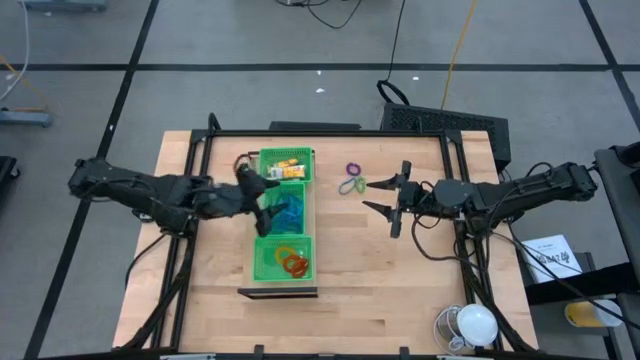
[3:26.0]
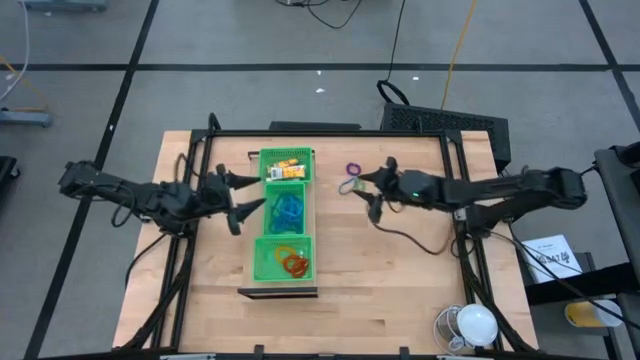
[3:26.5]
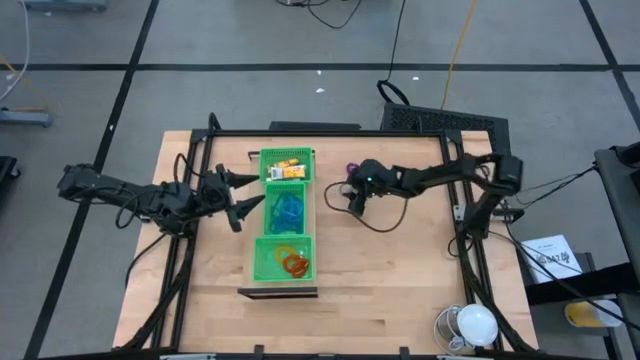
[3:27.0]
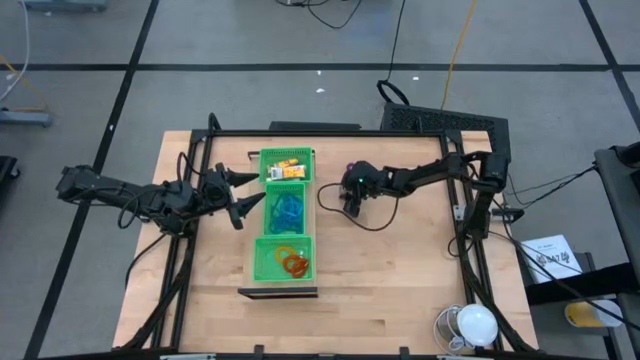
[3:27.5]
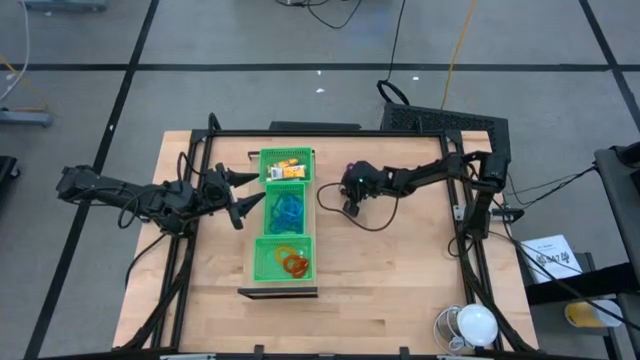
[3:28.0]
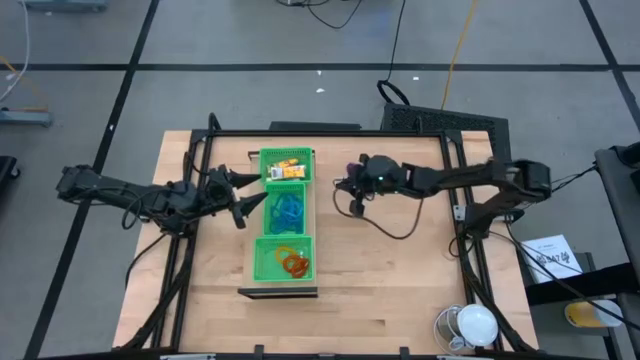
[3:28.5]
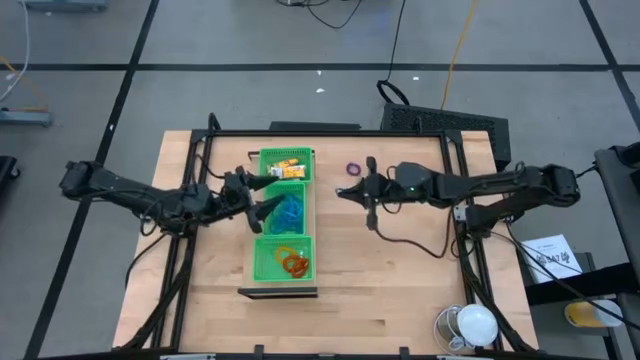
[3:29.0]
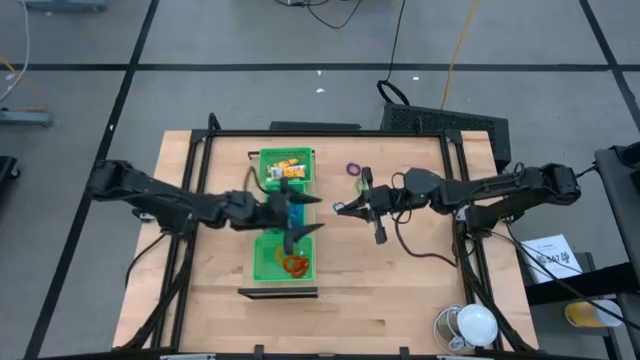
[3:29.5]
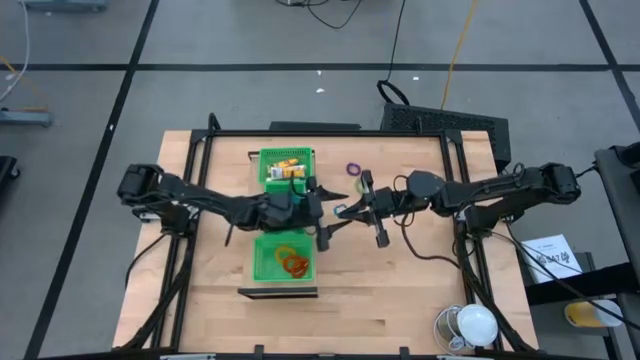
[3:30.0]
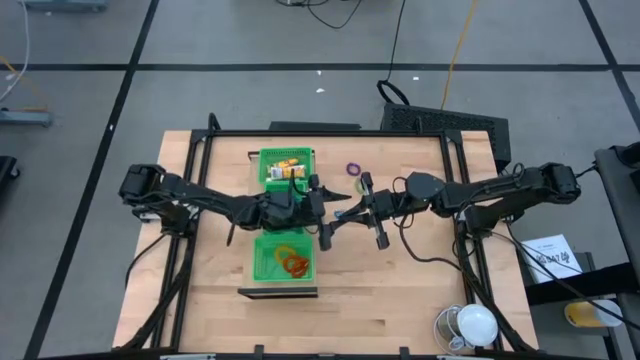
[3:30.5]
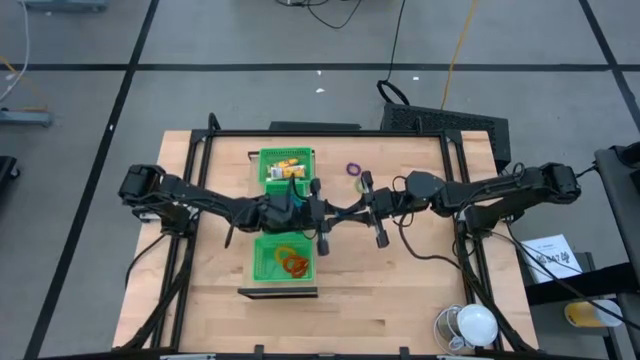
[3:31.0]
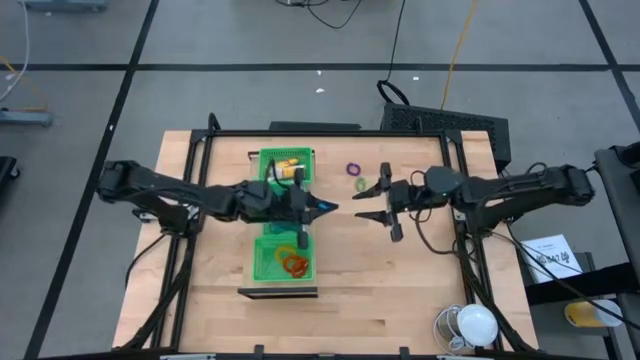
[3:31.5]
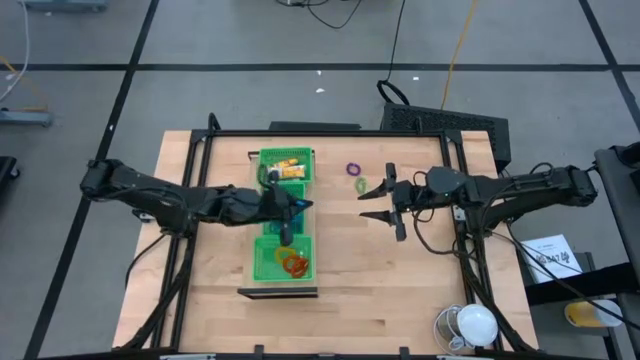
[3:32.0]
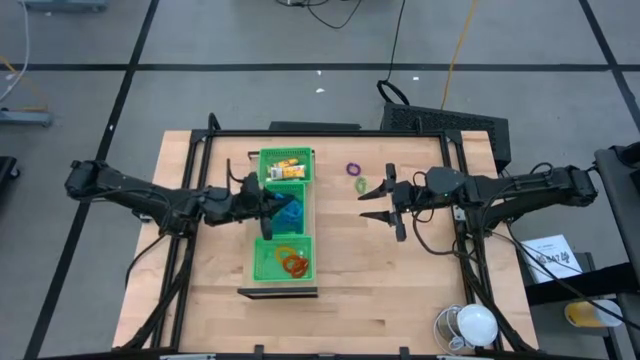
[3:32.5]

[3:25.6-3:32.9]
Task: Pick & Place Office Desk Supplies
Put the blue rubber band into the center green bin on the shelf

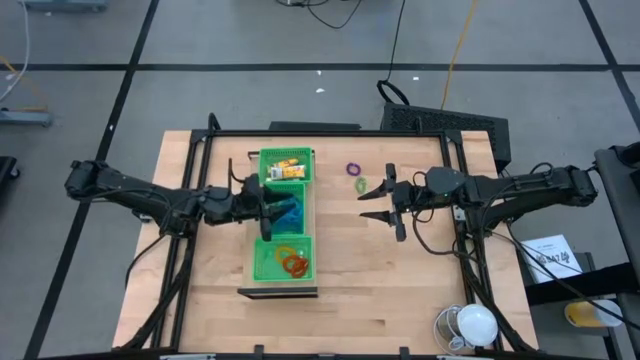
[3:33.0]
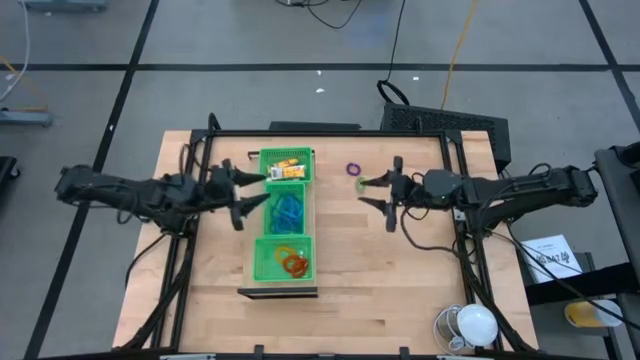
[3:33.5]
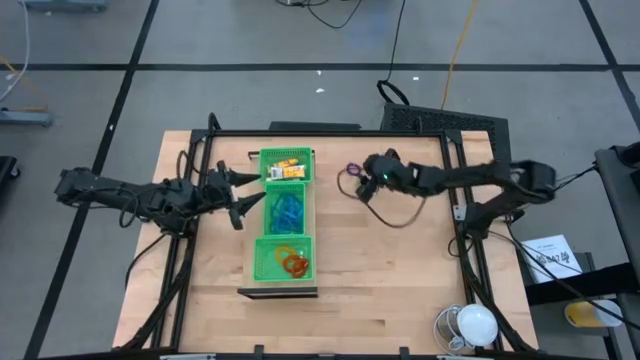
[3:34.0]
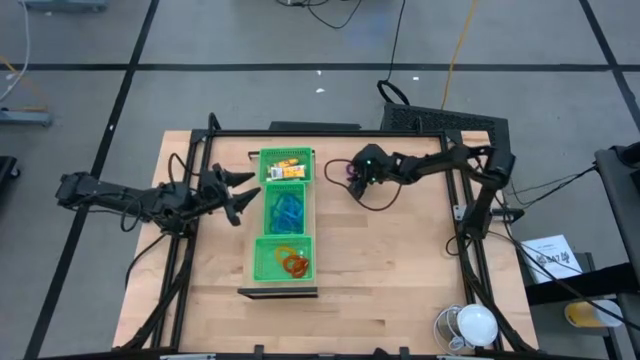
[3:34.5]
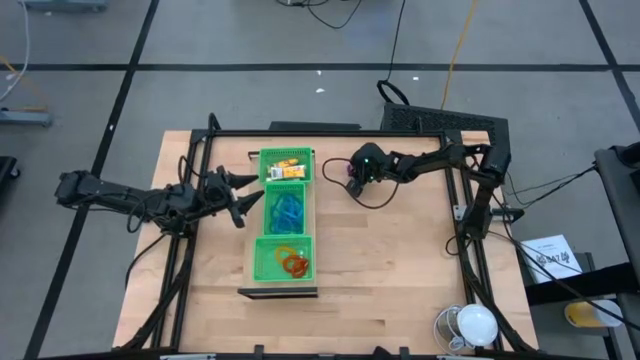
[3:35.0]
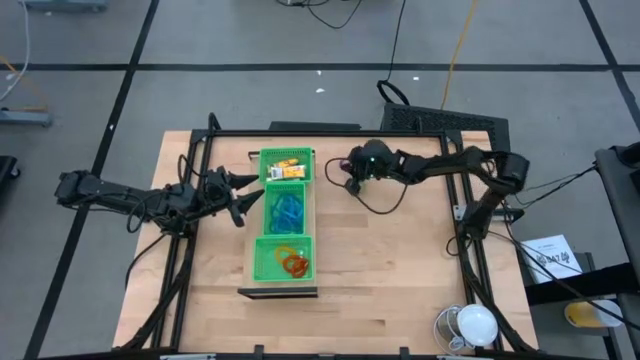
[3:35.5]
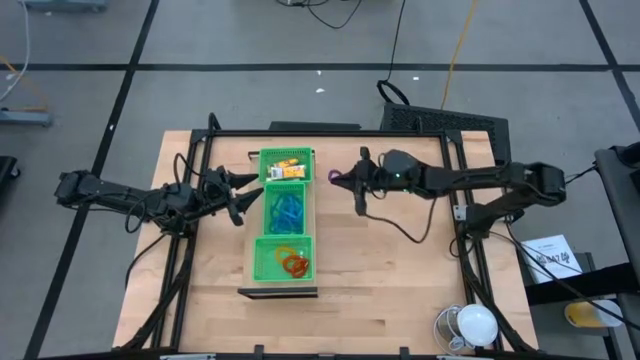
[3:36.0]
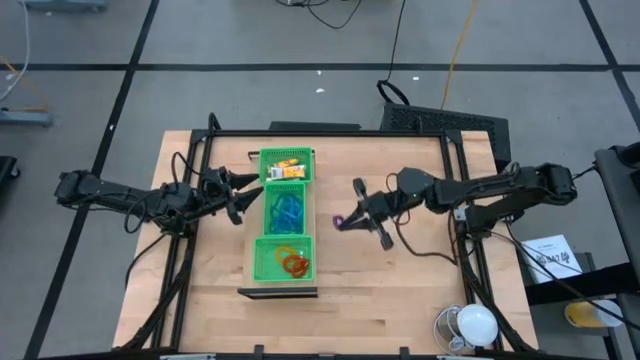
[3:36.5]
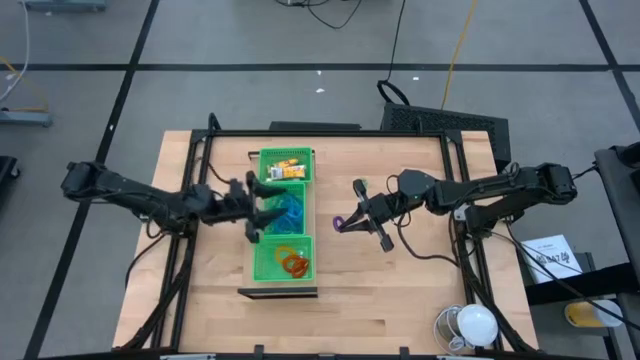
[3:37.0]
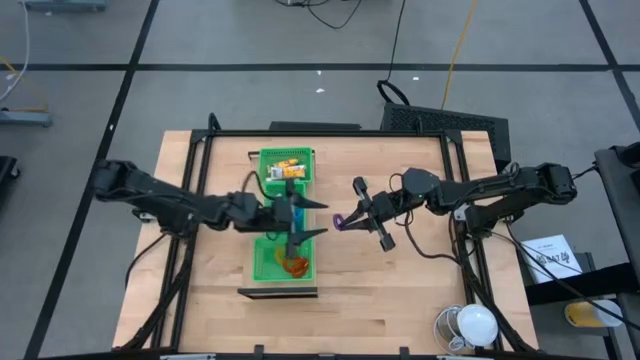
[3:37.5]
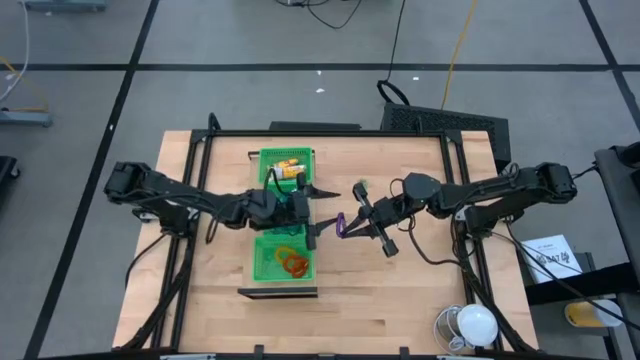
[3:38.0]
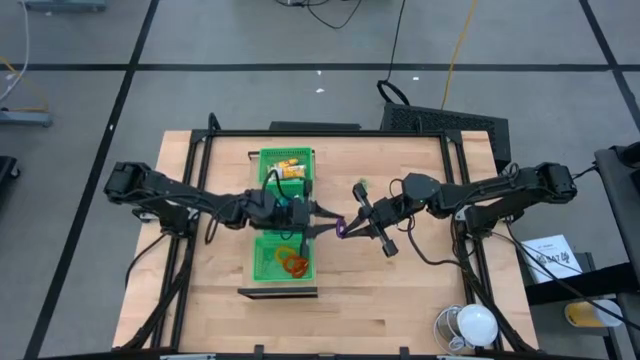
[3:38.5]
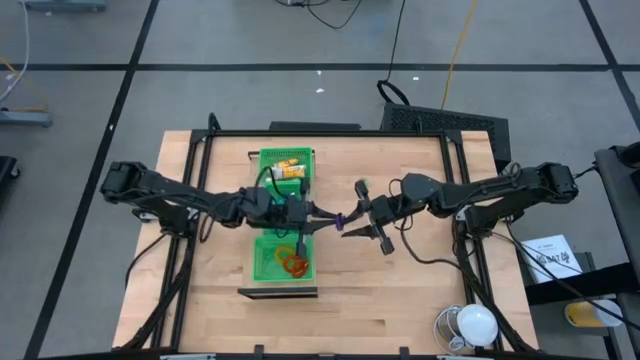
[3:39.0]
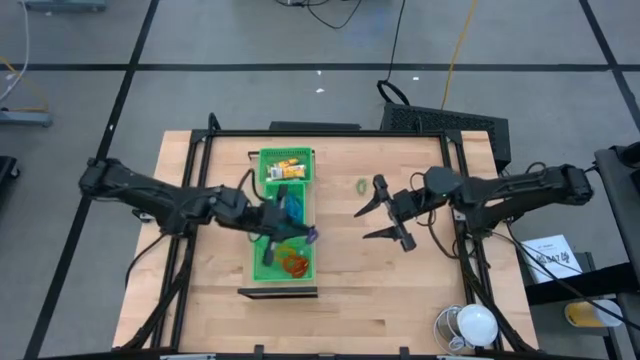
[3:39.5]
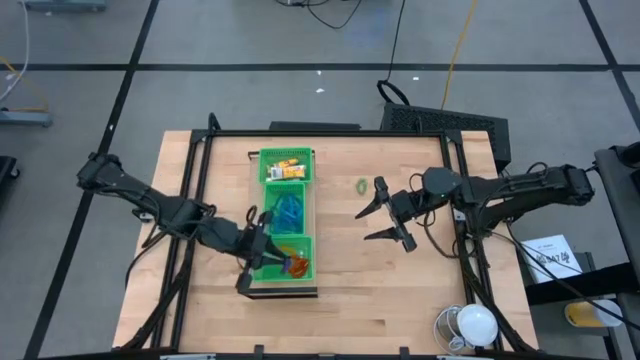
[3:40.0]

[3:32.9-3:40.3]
Put the purple spring rubber band into the bottom green bin on the shelf

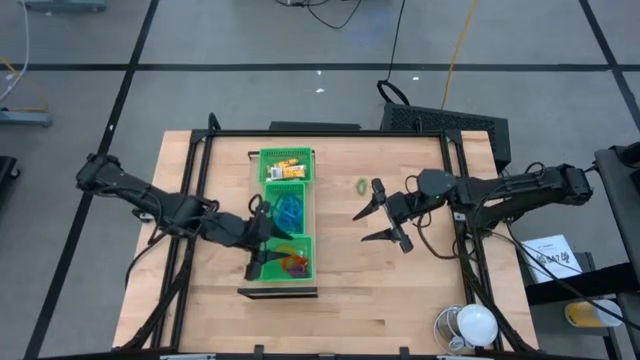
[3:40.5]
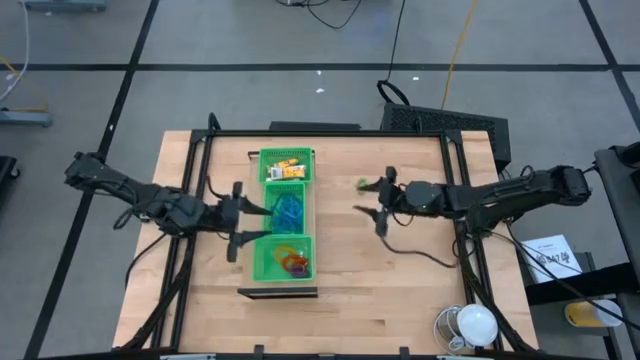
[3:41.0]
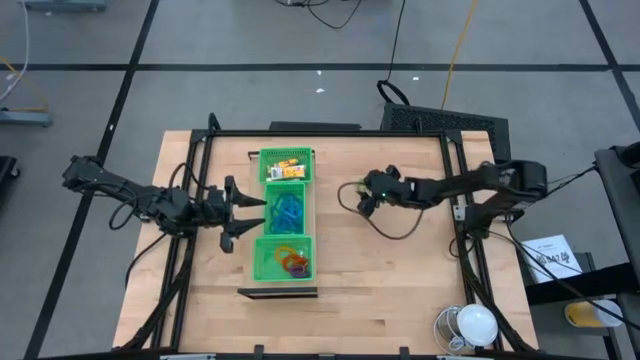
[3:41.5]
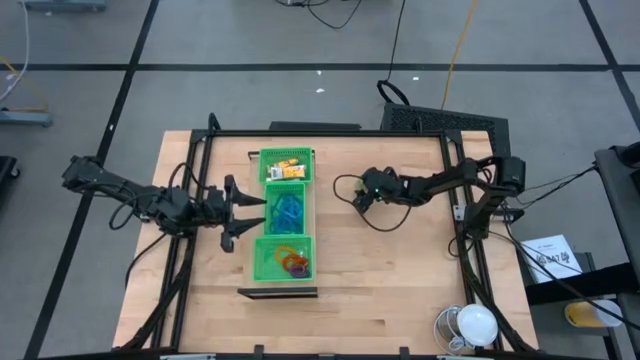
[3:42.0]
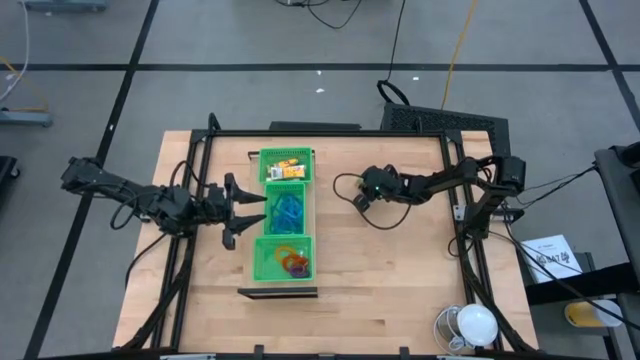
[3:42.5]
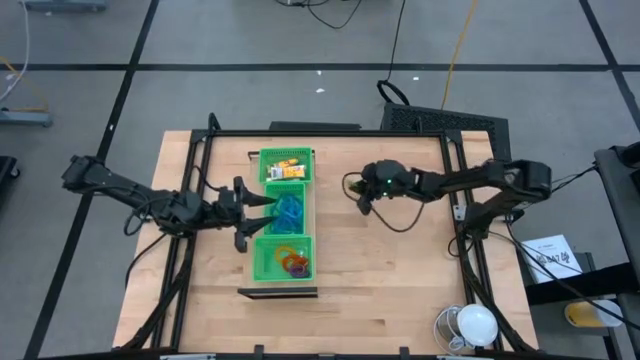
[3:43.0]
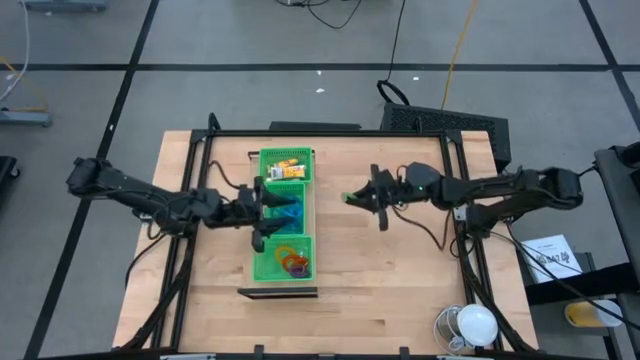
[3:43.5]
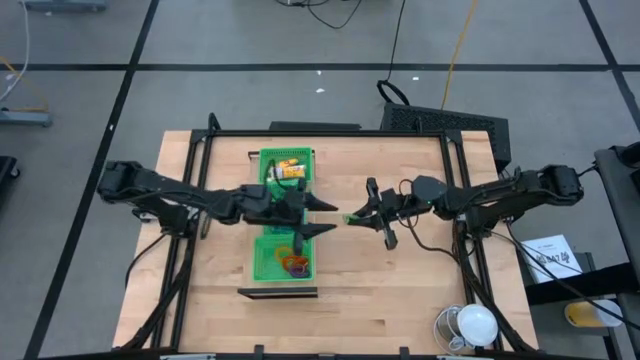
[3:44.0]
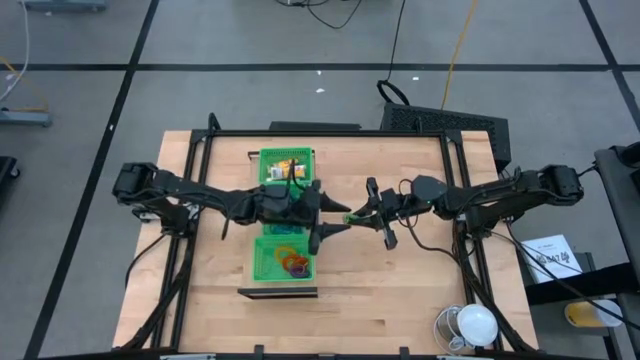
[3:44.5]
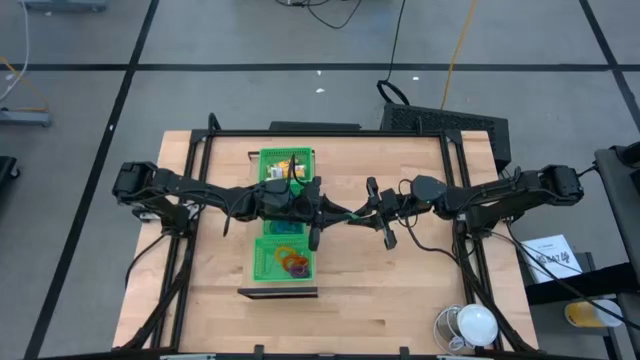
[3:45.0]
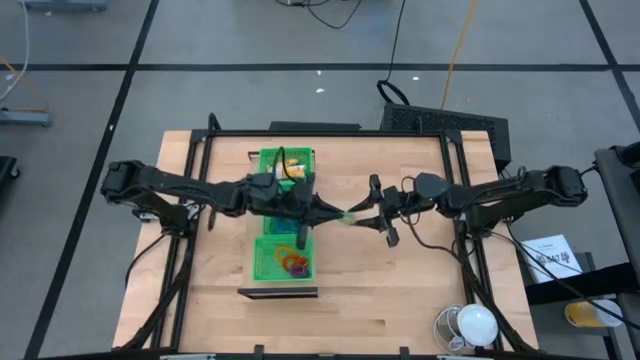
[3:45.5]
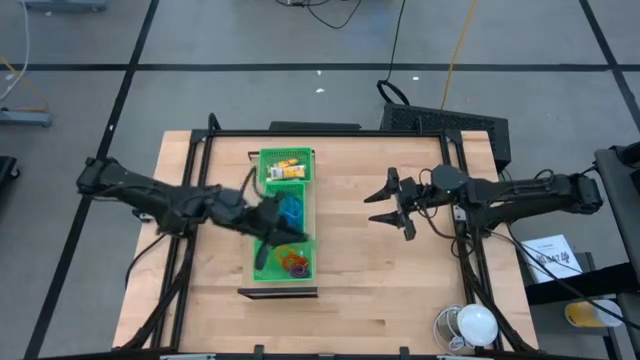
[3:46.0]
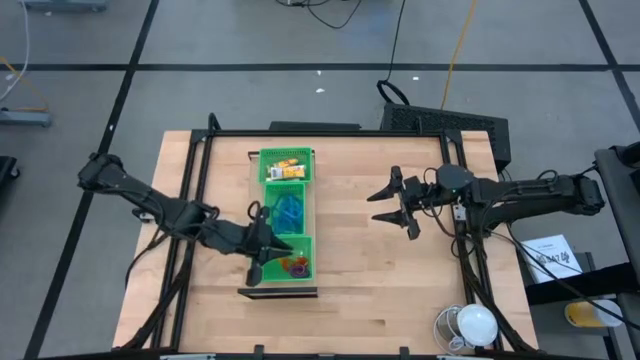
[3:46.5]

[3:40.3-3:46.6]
Put the green spring rubber band into the bottom green bin on the shelf

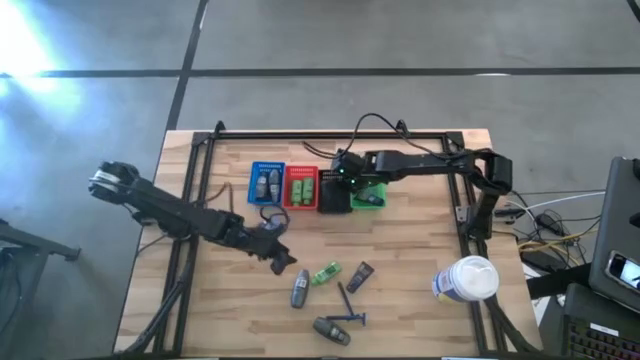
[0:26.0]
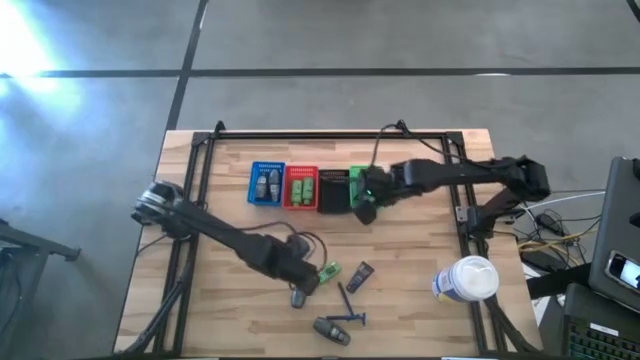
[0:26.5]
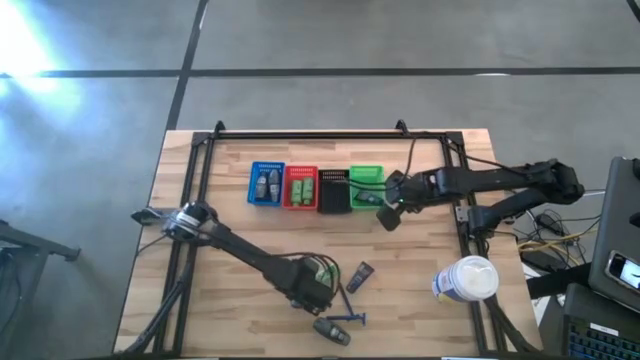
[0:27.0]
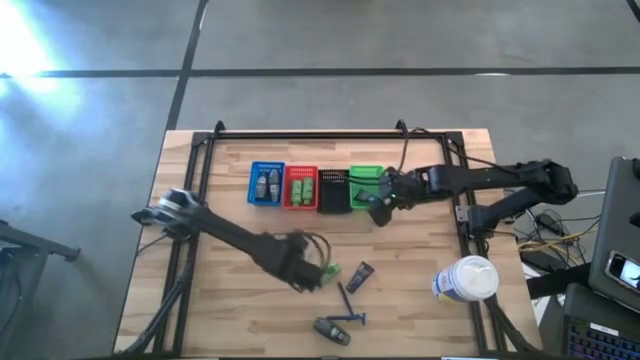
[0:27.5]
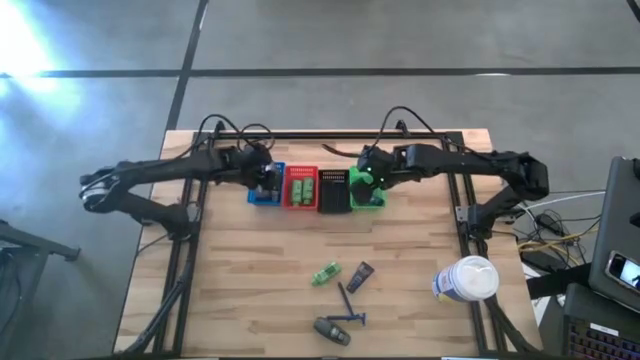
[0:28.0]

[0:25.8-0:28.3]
Task: Pick & Place Travel size toiletries
Put the deodorant into the blue basket
